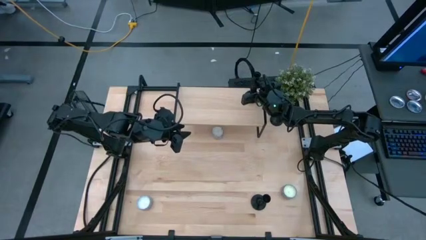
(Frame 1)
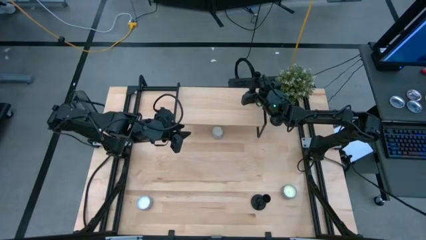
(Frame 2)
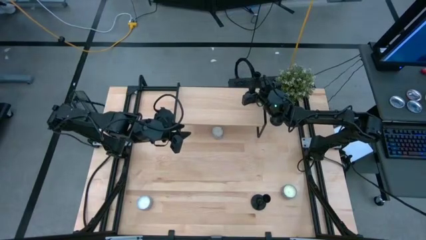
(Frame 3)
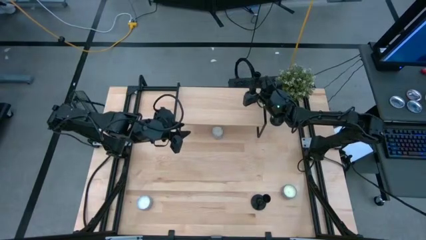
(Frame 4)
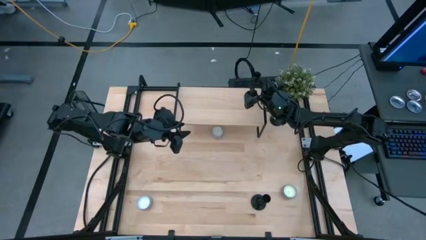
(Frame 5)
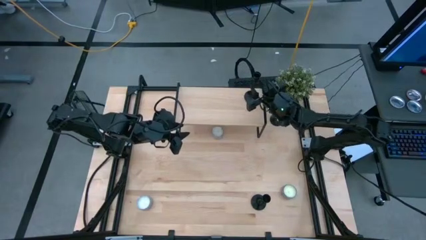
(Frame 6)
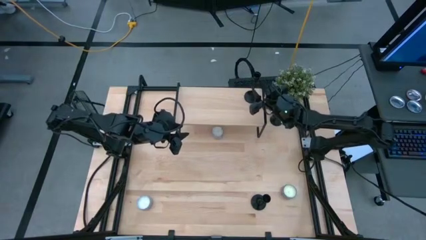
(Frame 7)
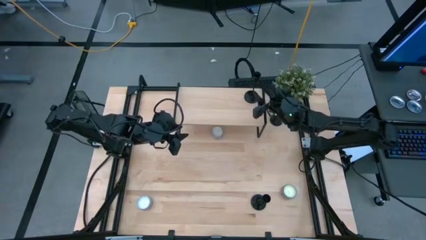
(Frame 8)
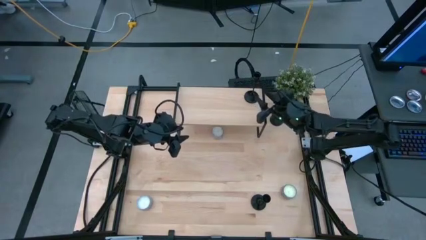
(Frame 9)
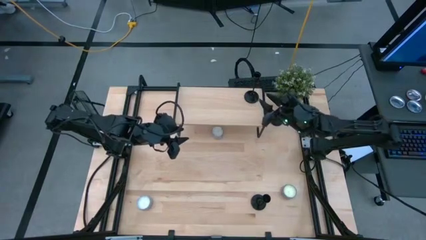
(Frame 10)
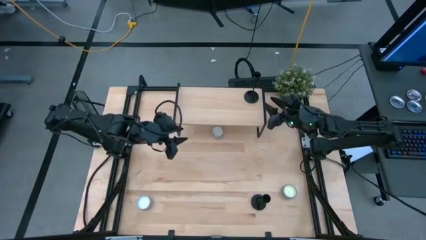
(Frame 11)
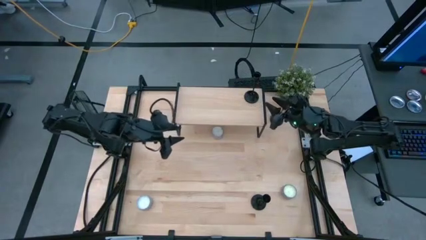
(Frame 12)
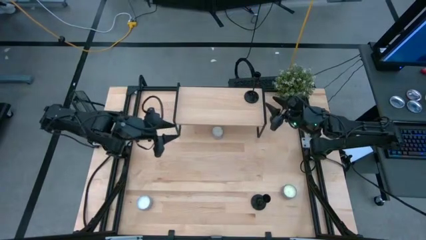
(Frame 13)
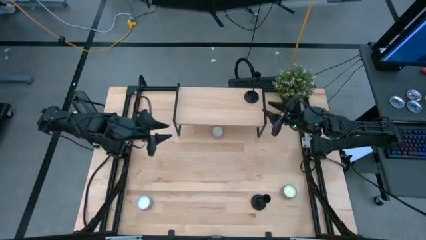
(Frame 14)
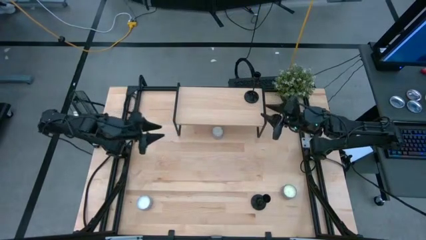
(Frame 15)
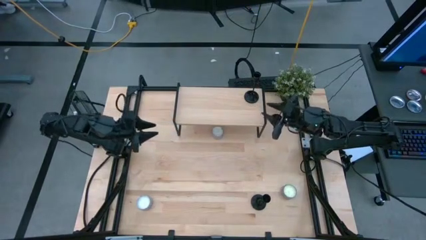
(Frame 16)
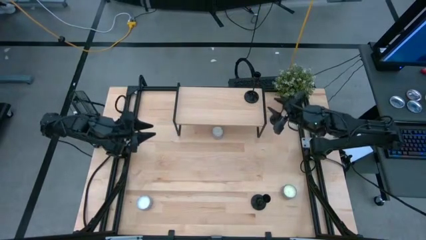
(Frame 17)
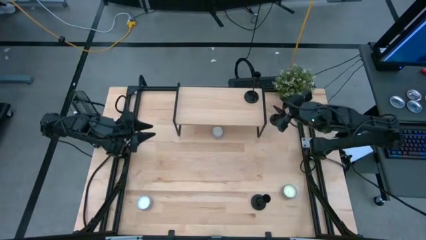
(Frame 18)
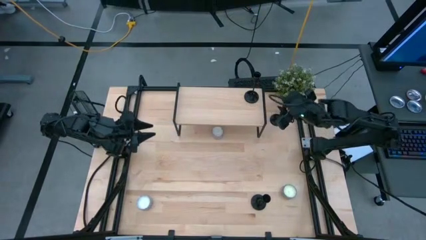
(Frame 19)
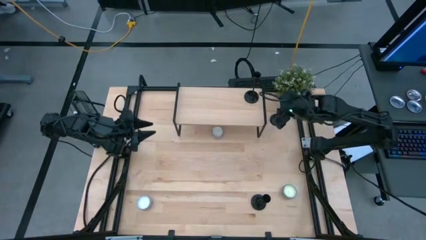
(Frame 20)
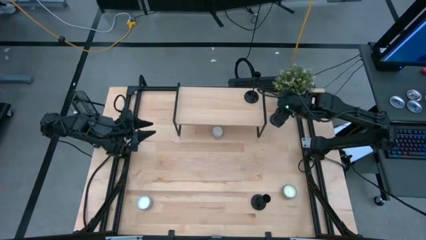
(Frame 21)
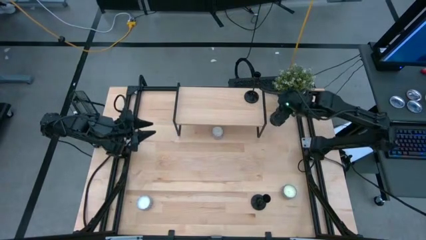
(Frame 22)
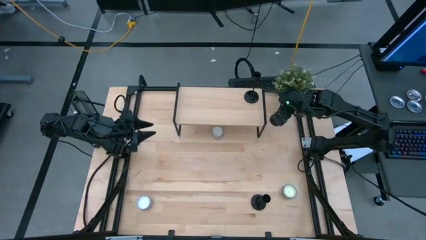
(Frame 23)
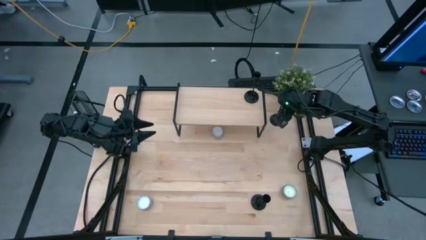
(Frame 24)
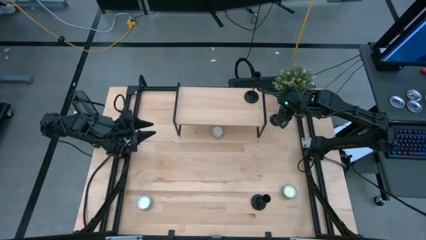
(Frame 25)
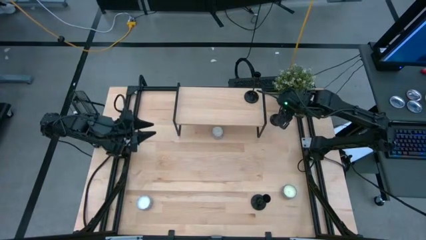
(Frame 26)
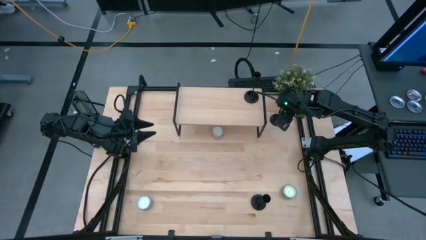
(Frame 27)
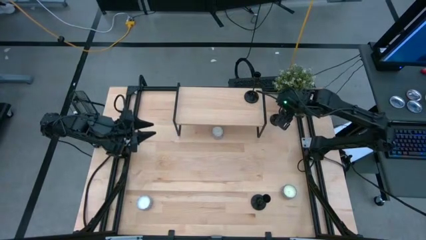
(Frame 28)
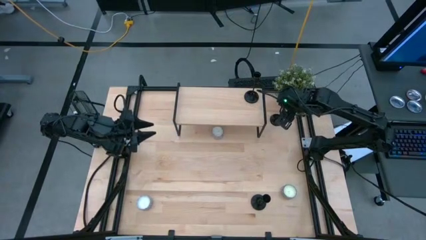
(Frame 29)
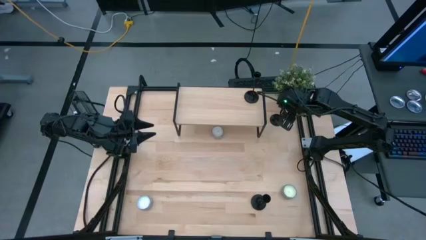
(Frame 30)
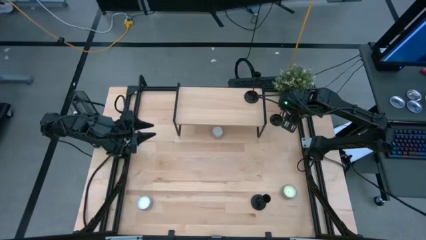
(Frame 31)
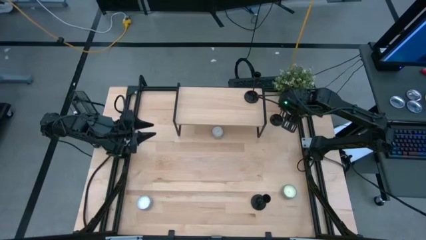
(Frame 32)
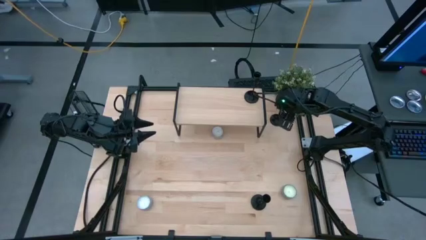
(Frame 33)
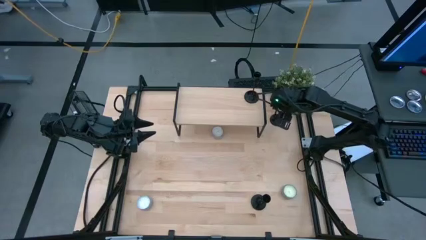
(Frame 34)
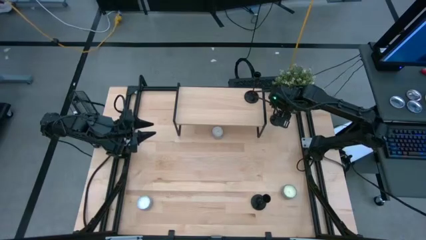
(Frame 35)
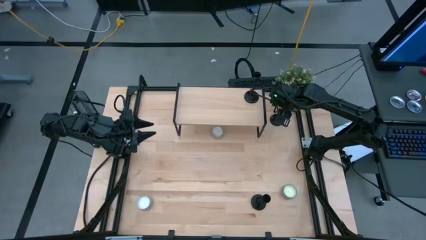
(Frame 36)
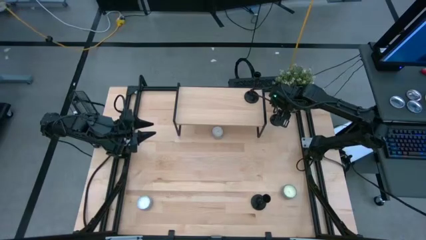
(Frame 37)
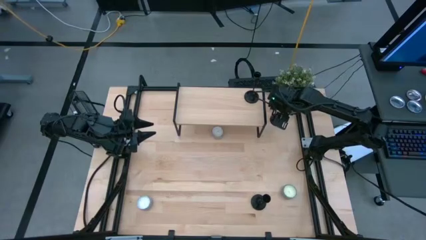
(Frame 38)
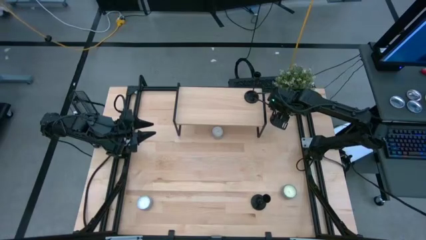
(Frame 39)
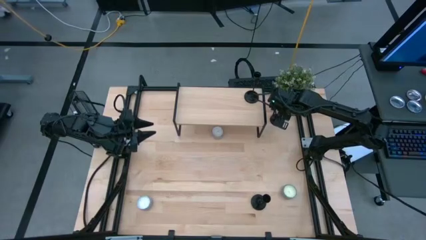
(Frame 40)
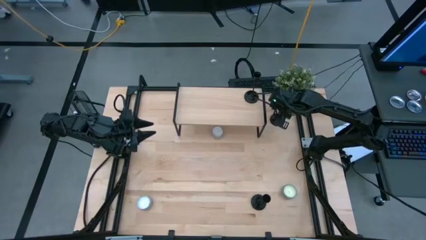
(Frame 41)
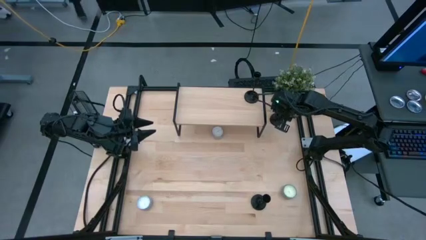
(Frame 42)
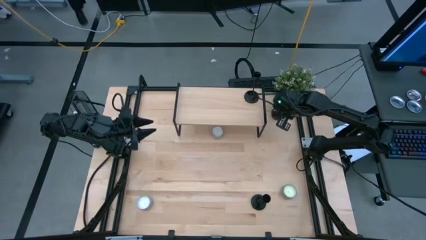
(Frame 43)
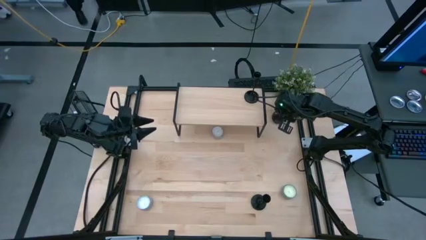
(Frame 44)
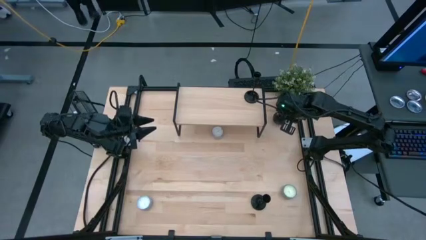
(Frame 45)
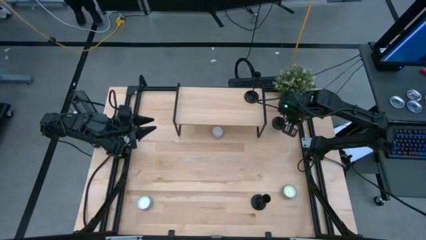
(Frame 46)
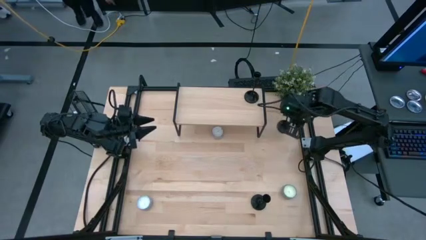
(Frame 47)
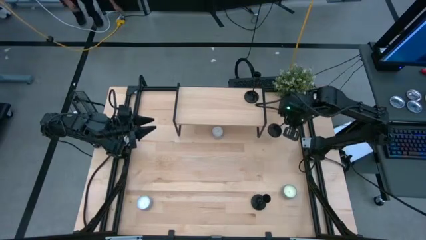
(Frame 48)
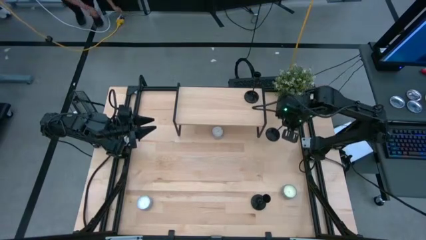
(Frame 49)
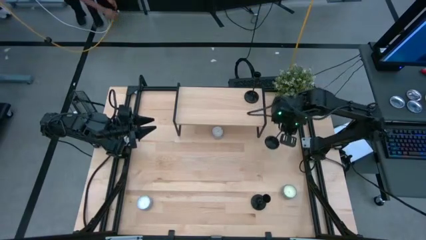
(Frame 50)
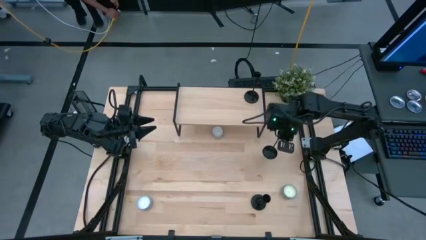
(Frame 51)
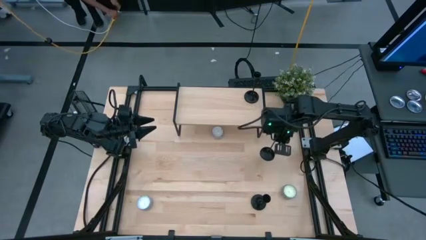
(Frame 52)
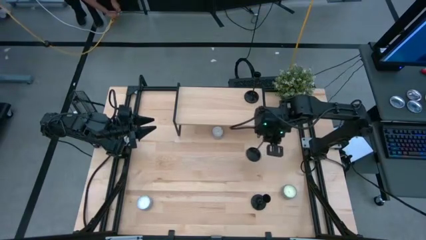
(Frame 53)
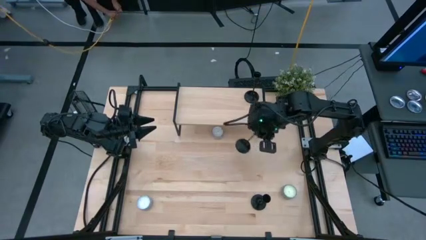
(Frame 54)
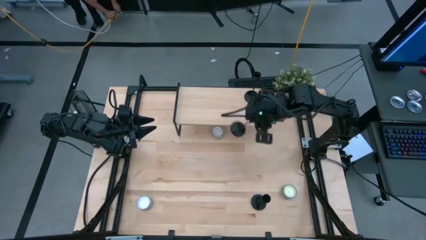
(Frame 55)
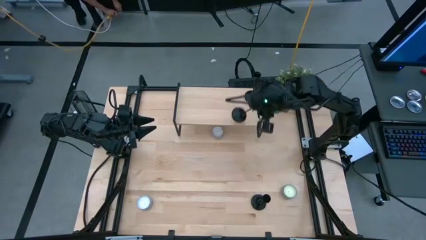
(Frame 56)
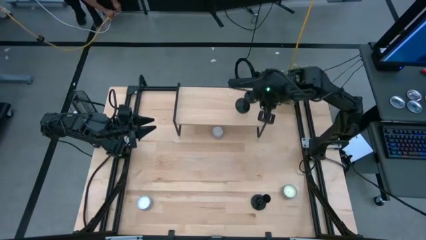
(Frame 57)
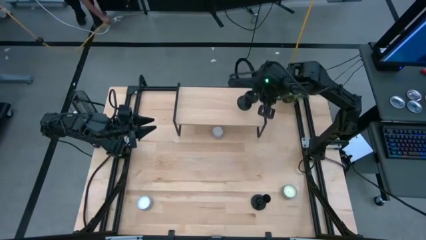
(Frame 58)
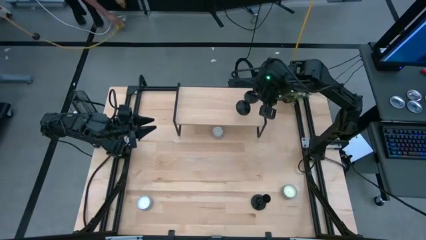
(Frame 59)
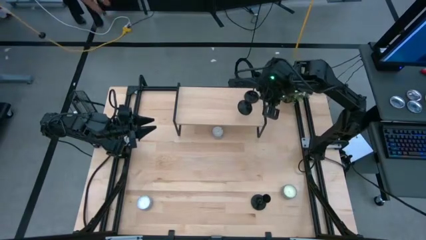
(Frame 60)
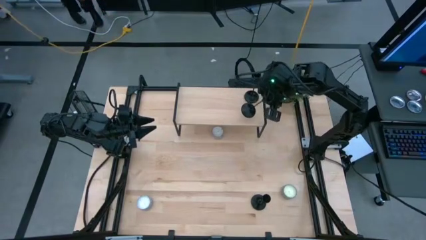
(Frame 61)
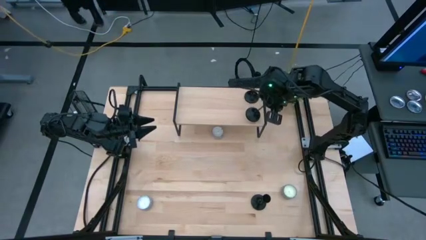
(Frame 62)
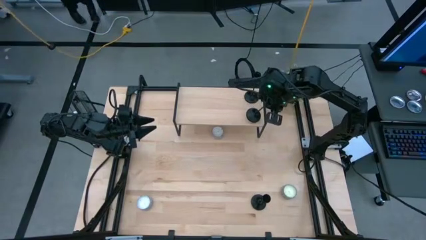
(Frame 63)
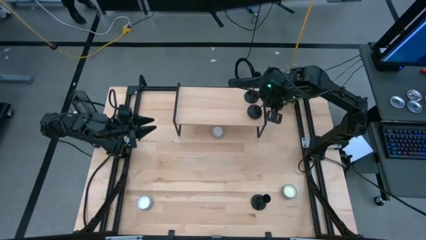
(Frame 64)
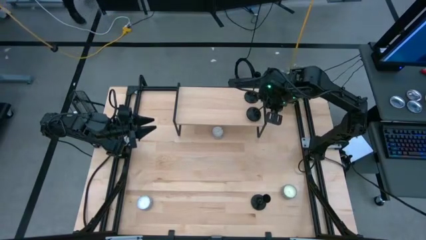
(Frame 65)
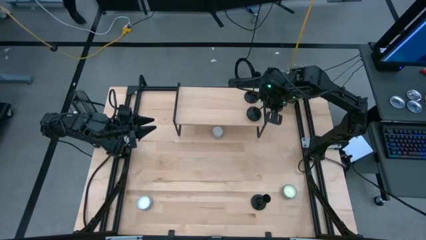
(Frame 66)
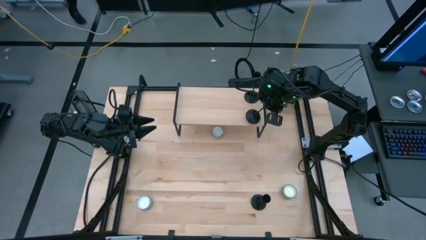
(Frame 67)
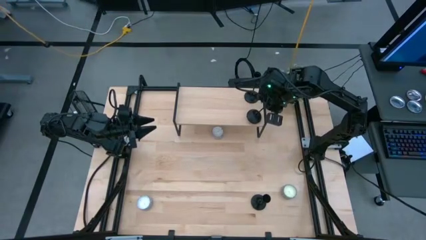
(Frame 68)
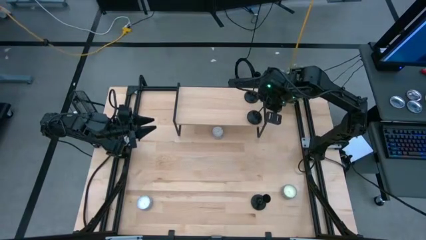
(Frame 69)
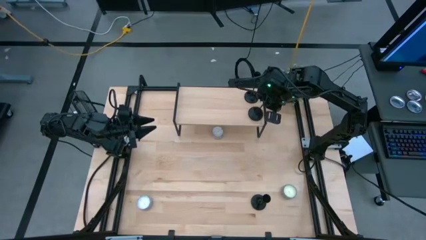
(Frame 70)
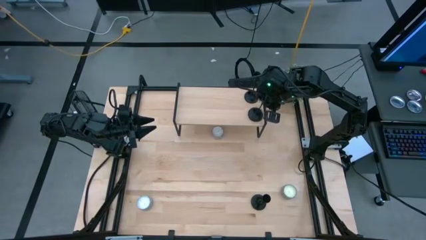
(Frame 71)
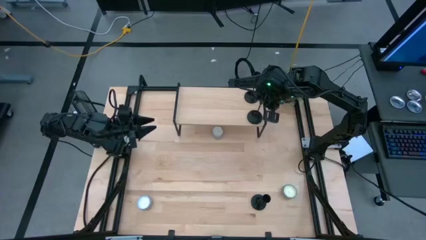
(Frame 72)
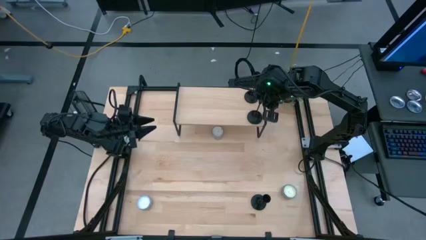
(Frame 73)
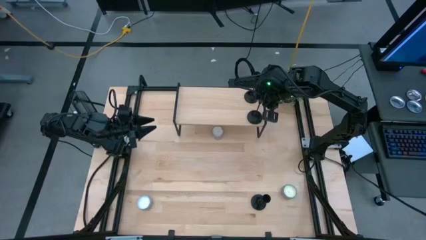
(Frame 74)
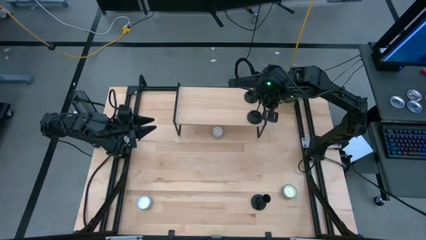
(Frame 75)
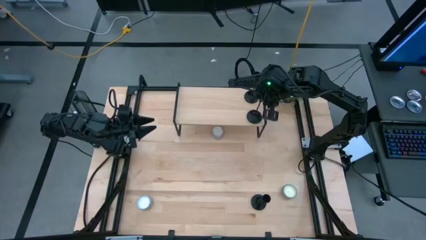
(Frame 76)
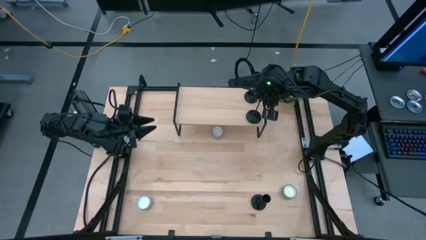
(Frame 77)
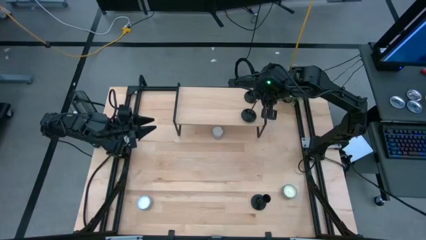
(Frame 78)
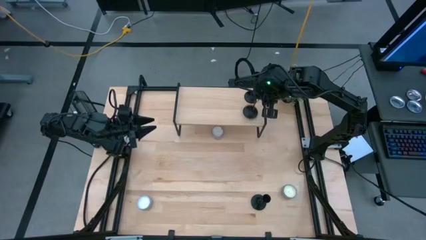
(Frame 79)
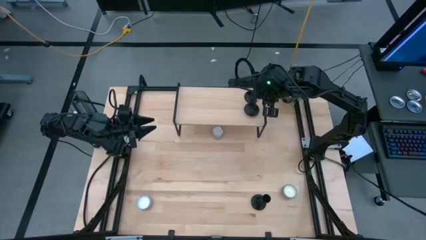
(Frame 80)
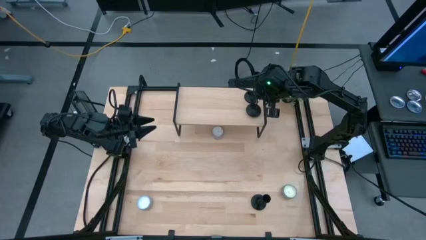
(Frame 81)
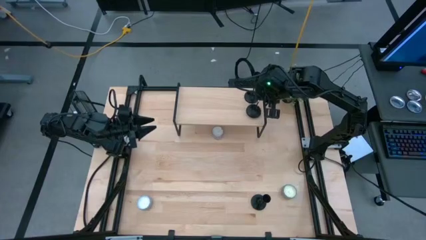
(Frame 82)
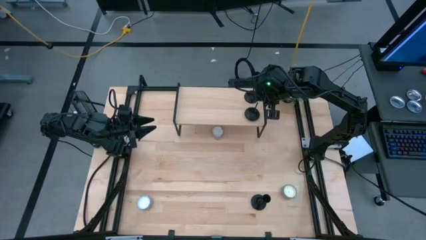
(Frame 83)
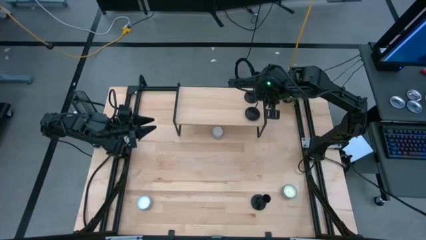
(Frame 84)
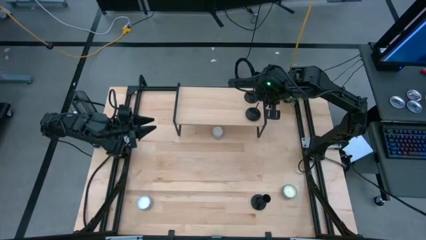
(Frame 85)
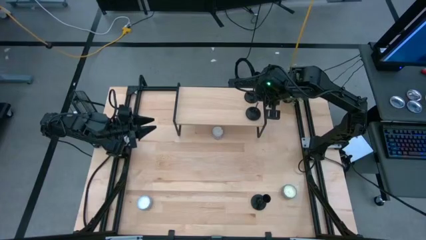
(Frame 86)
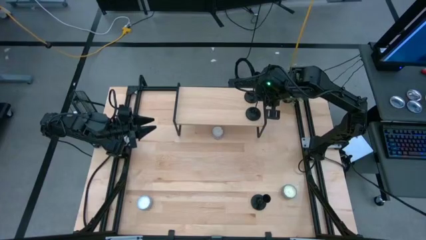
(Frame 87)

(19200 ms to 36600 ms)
Task: Pick & Place candle stick holders
Put the top black candle holder on the shelf
